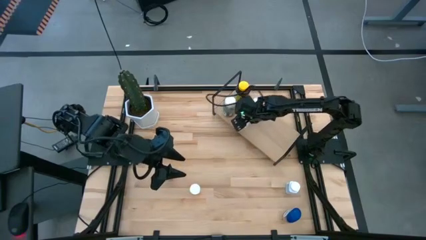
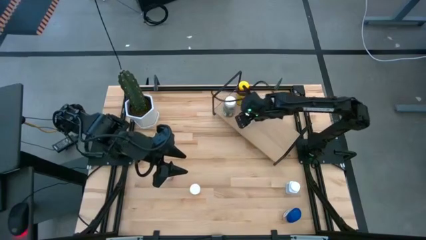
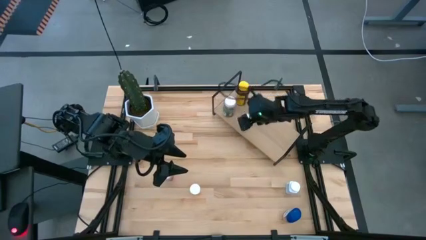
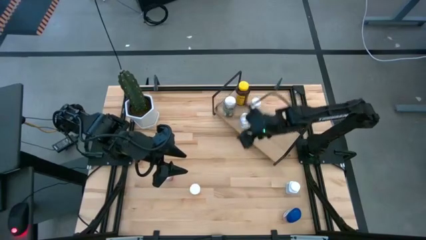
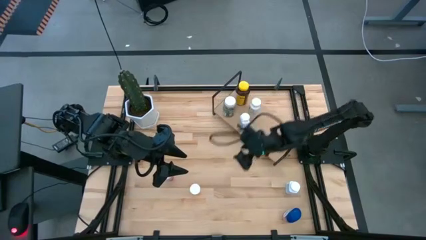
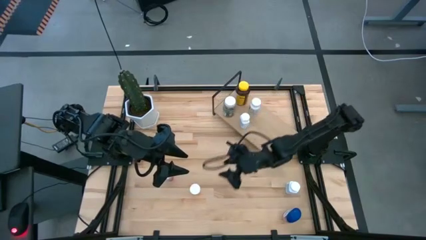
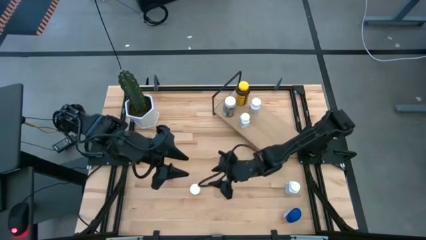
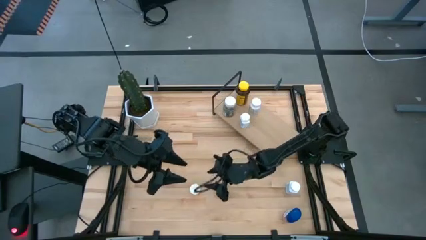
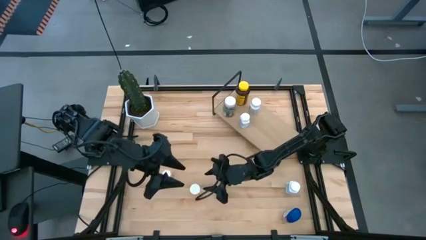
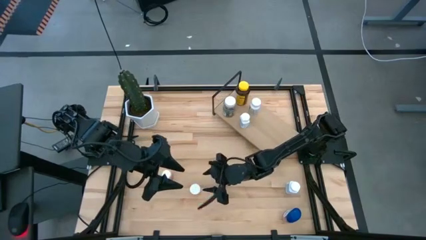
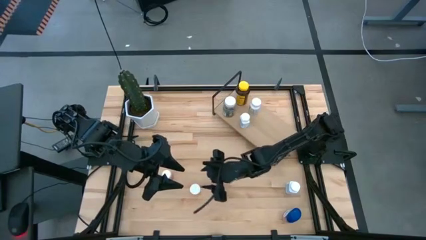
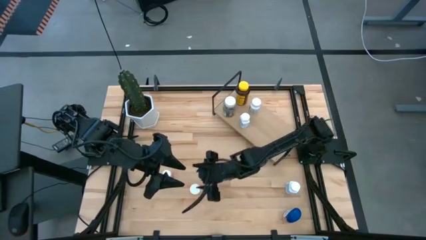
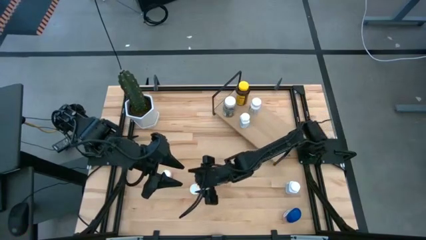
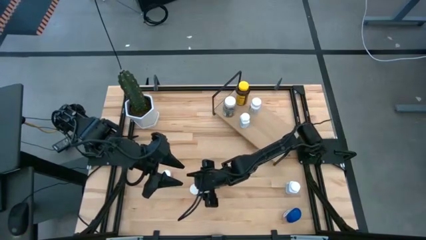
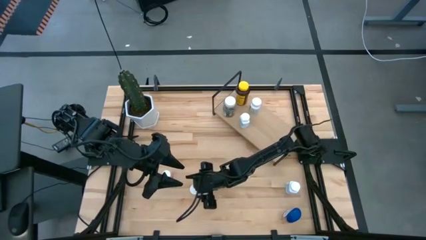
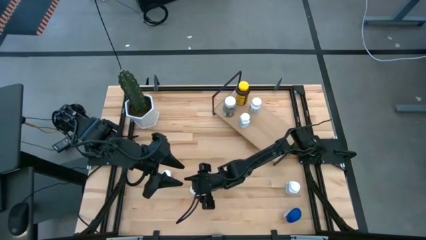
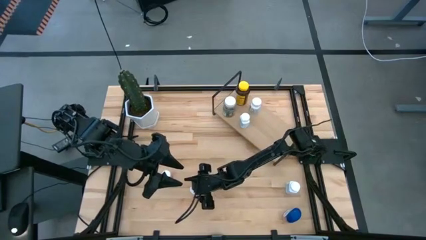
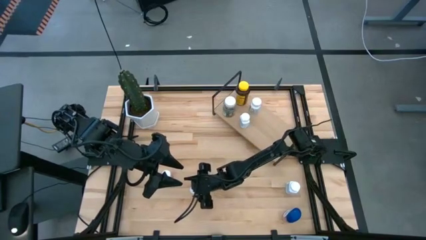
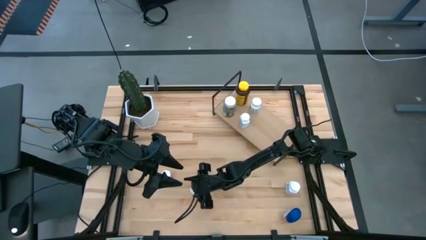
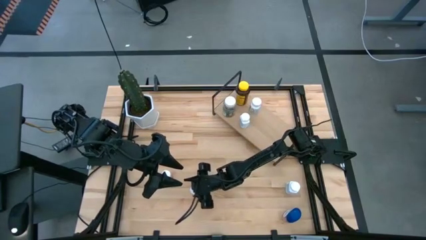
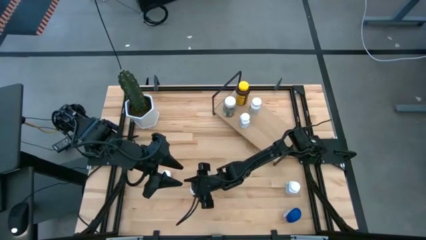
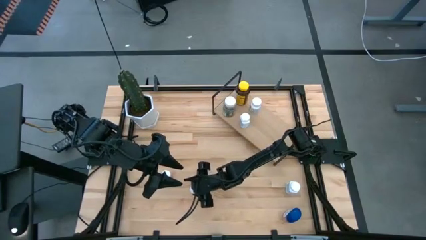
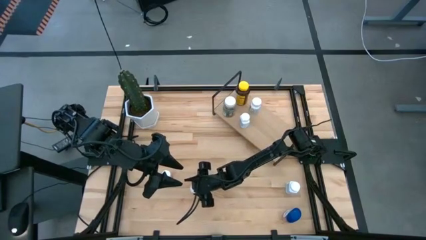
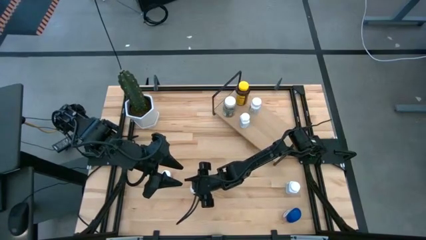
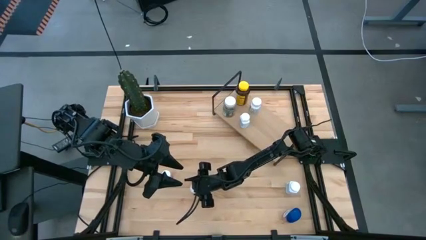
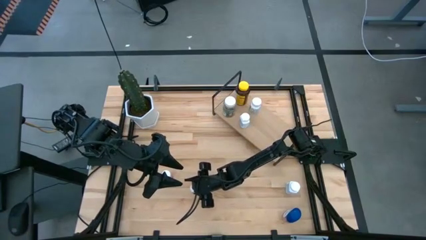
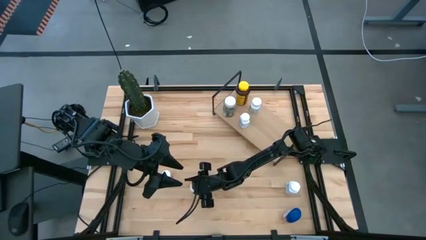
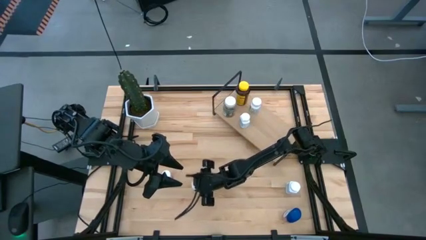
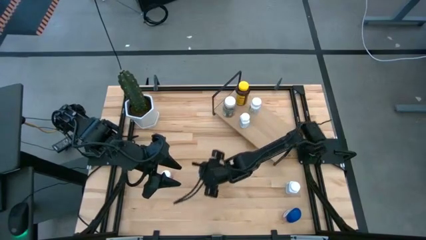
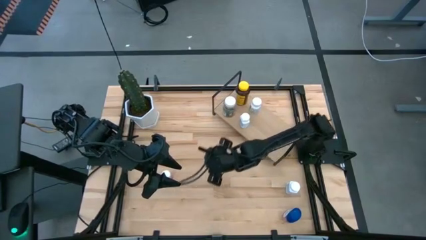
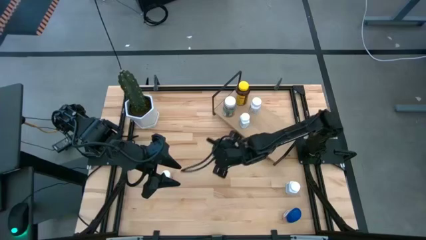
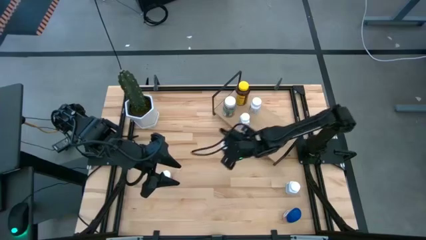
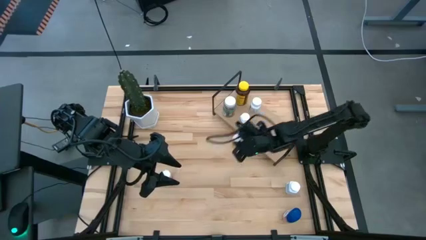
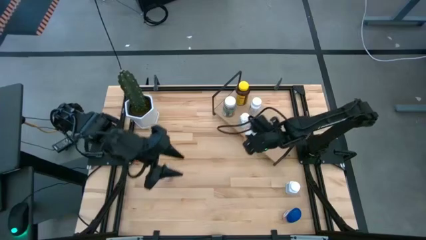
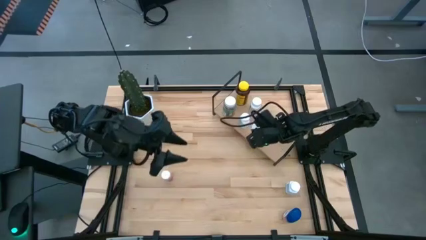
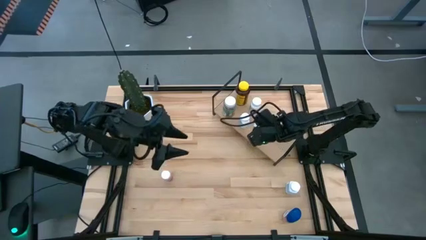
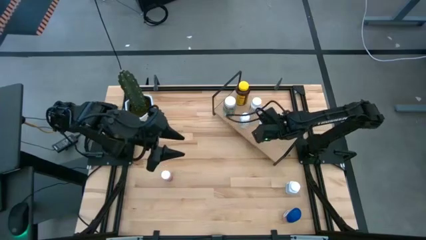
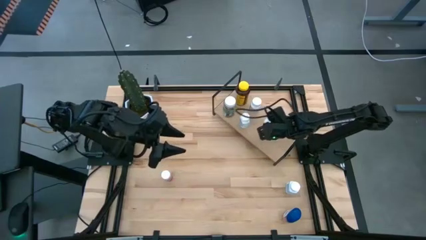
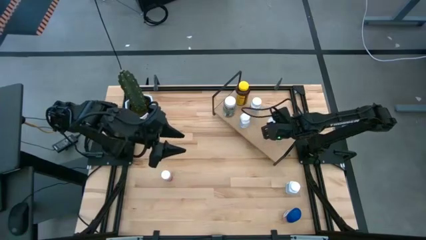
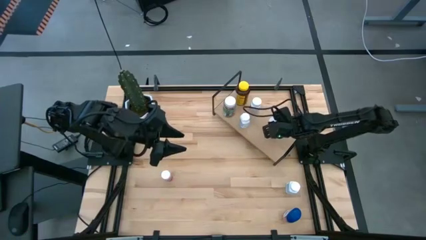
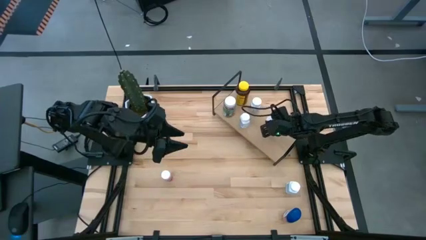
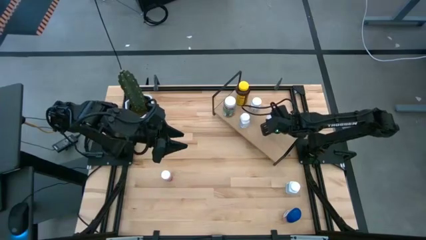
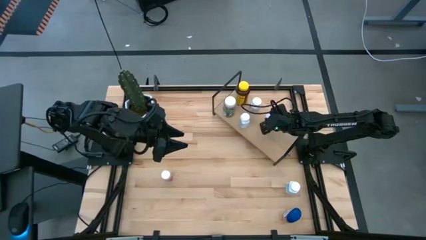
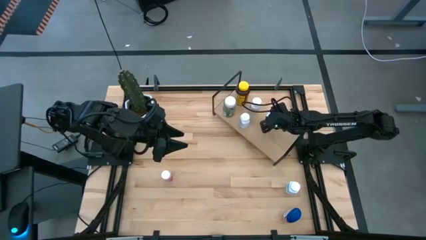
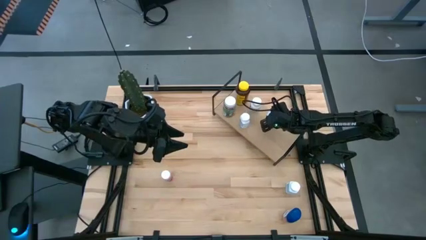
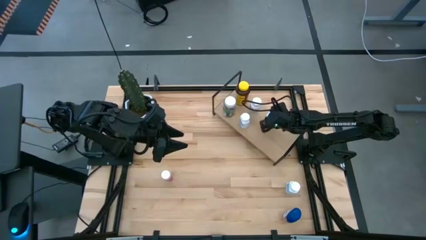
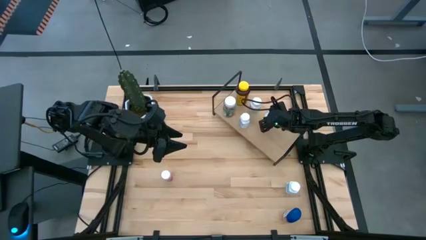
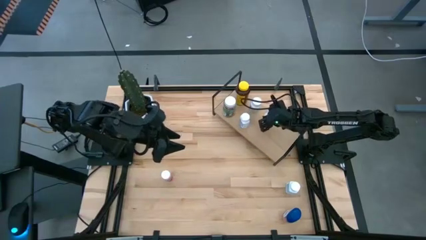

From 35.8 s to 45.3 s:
Task: Pick and place medicine bottles onto shelf by color
Put the small yellow medicine bottle on the shelf

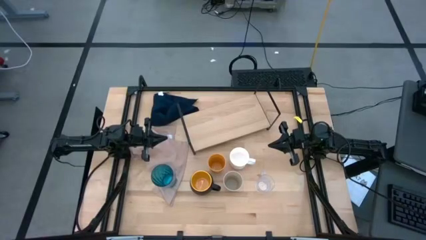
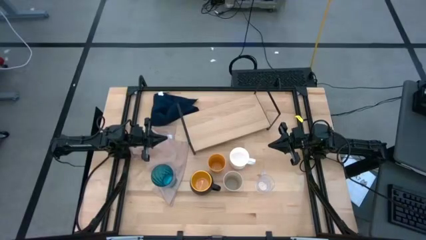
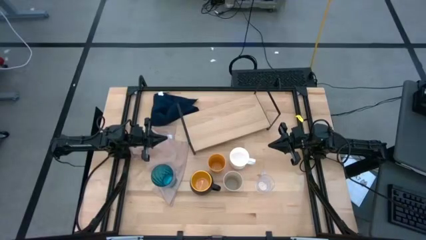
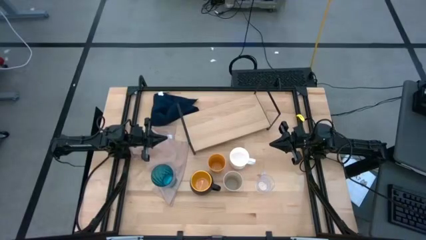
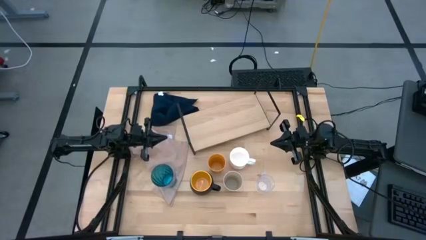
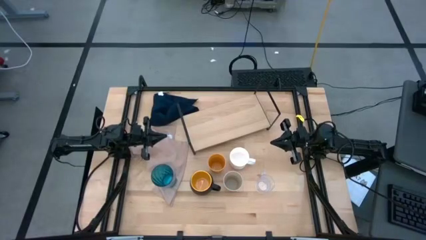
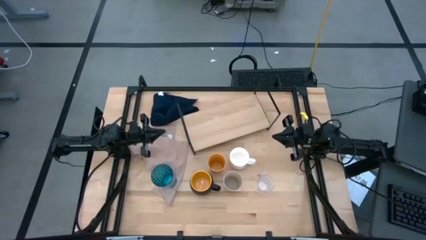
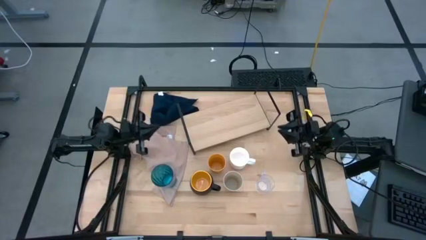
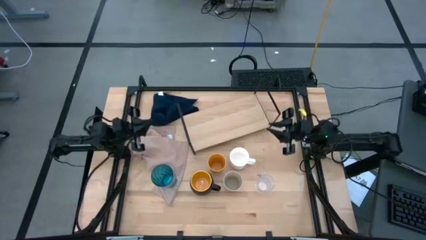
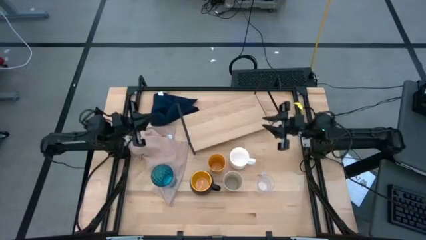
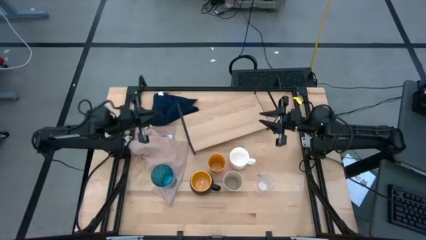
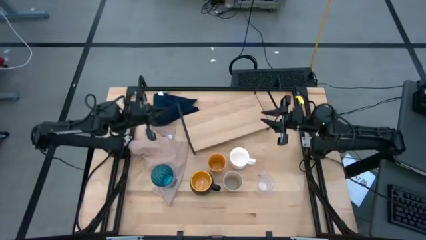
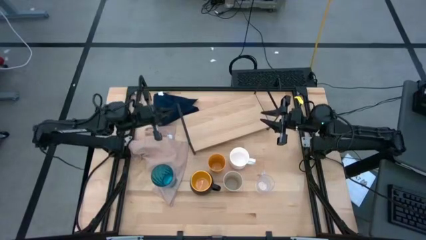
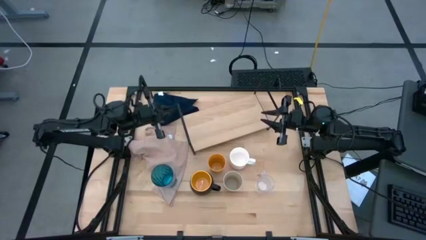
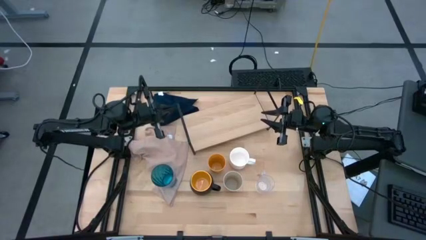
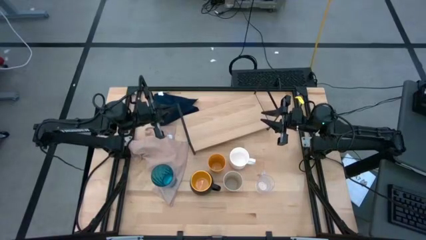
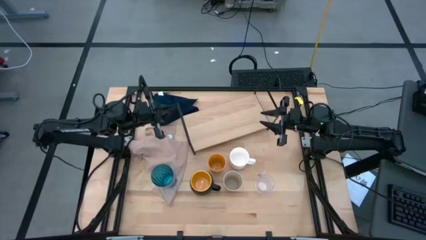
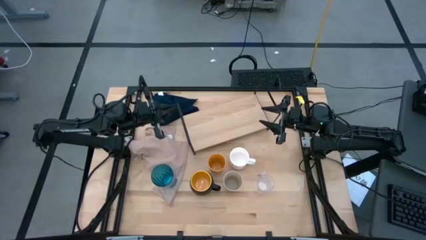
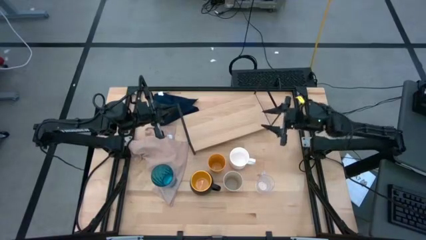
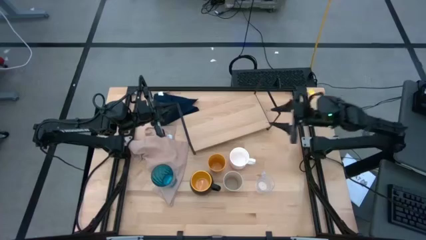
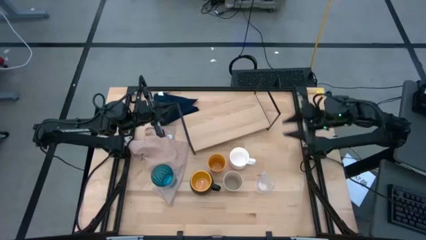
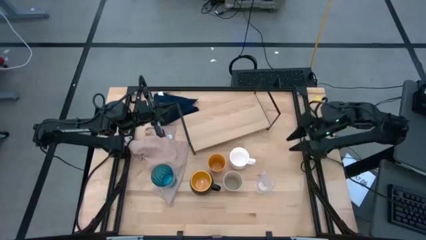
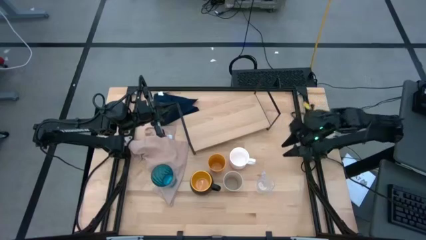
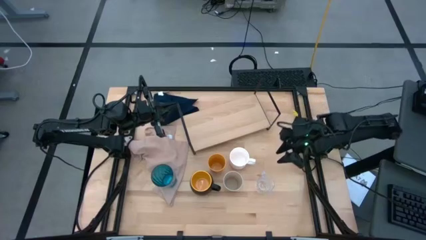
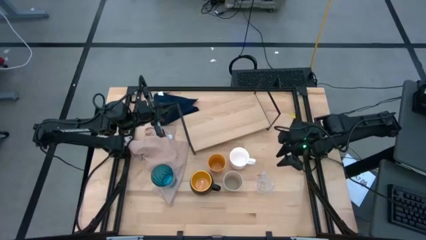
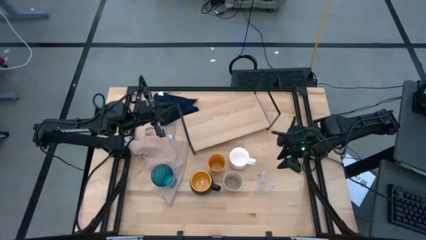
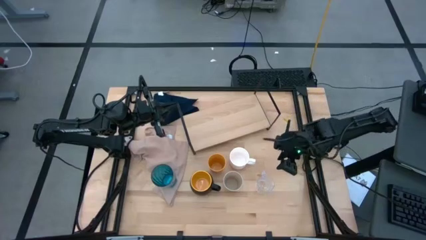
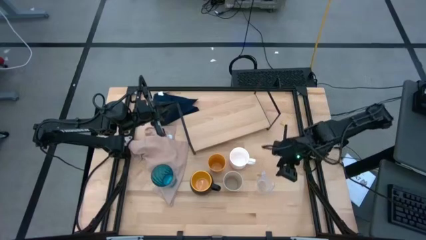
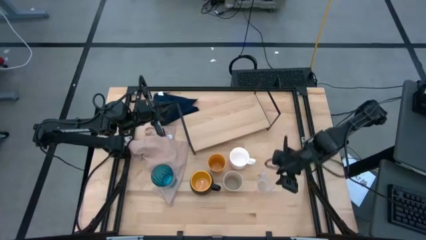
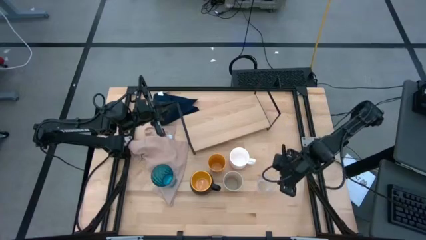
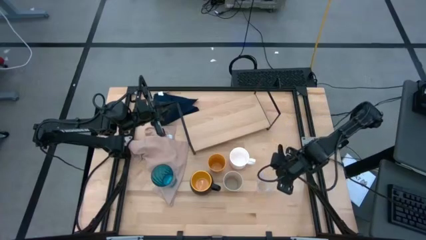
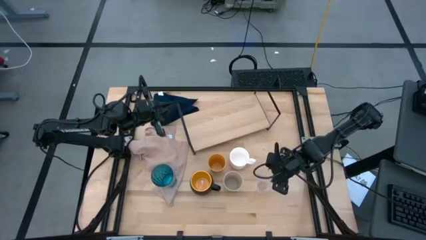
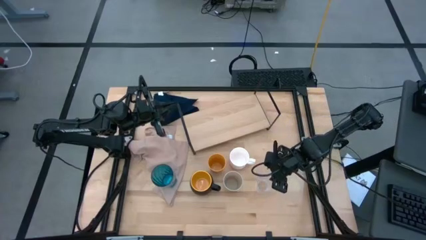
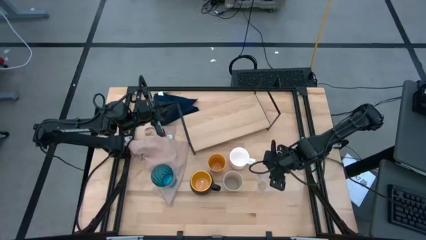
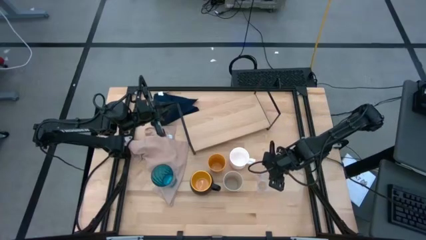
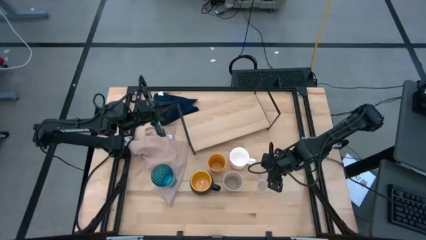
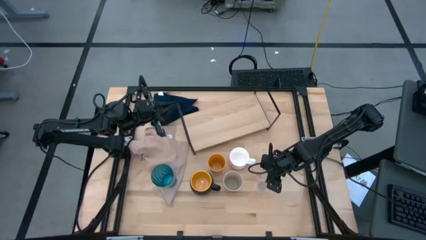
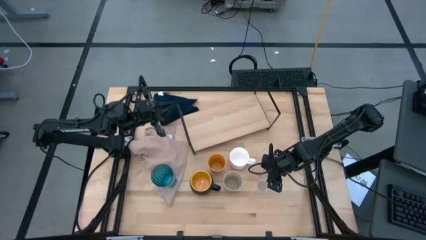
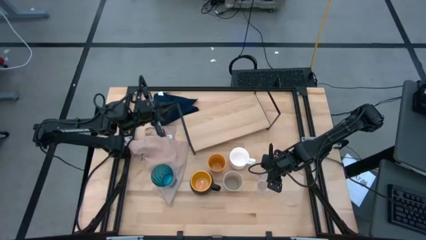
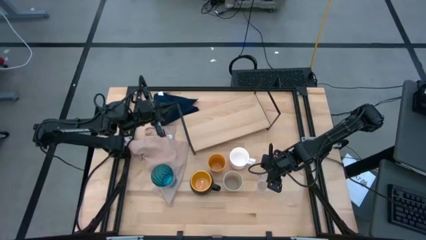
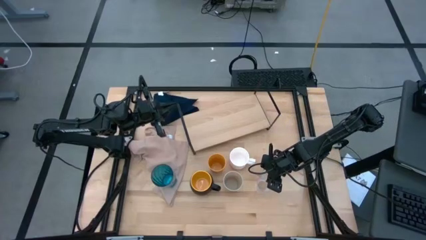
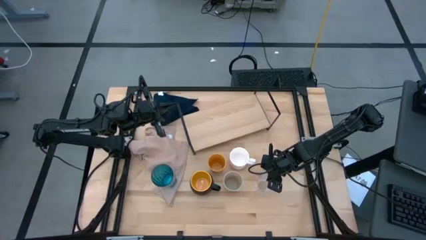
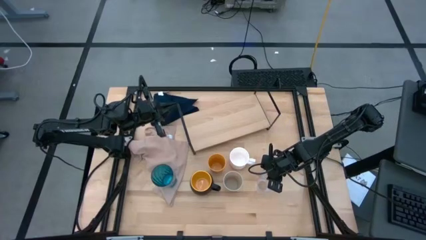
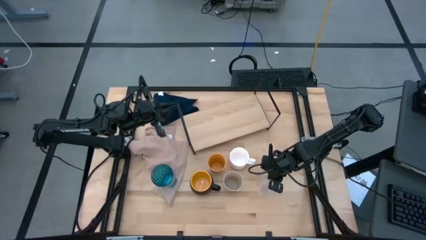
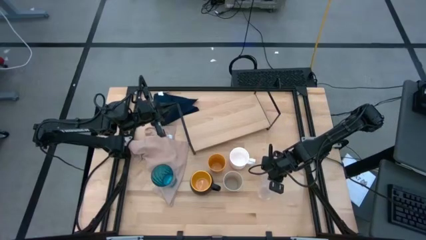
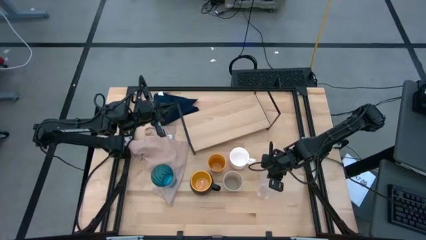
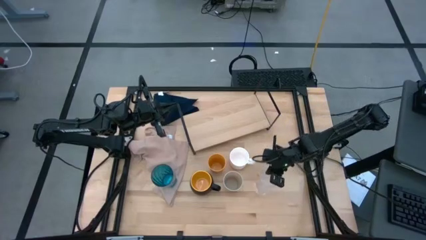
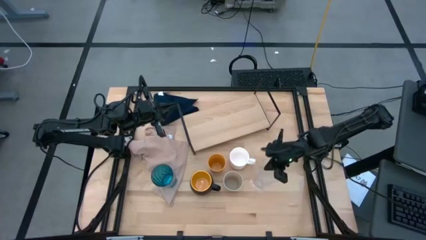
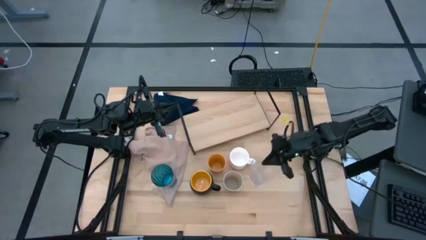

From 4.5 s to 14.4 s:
Task: Stack small to large cups/mugs on shelf
Put the transparent cup on the shelf
